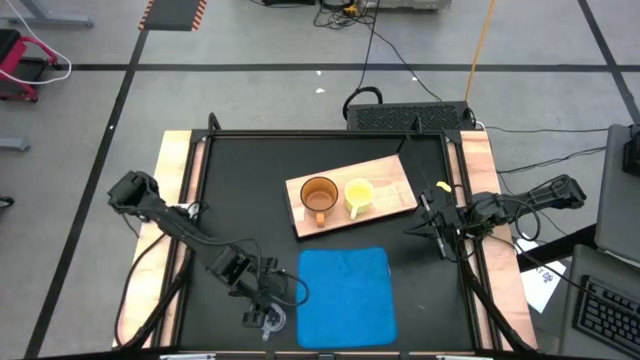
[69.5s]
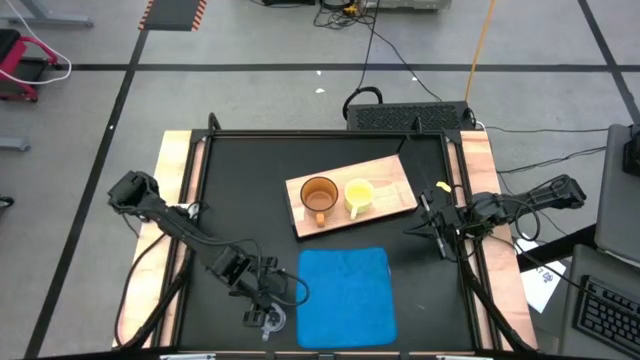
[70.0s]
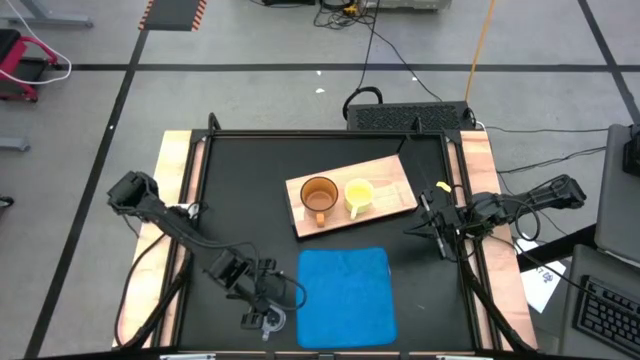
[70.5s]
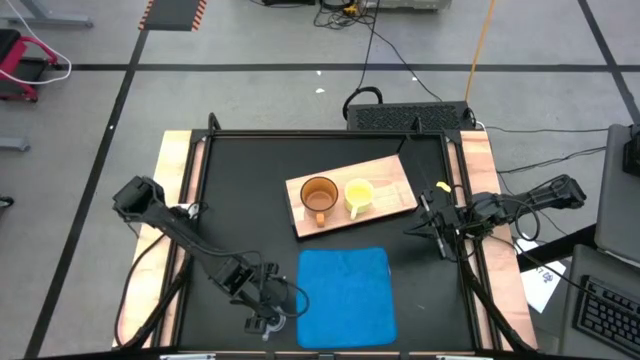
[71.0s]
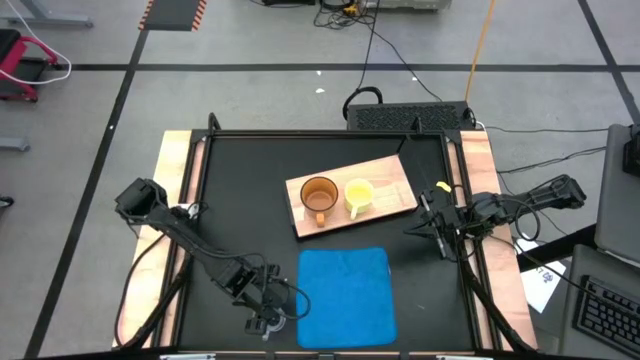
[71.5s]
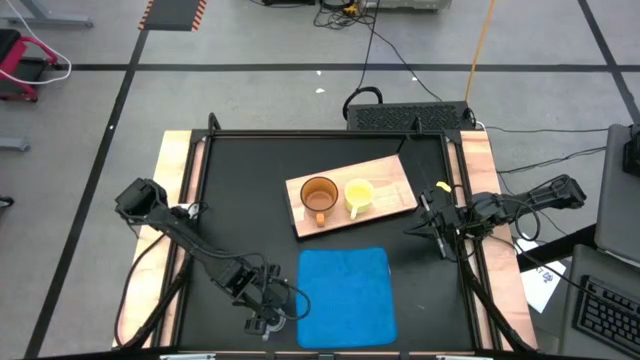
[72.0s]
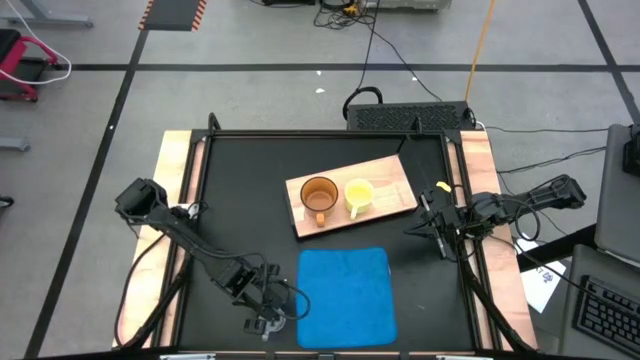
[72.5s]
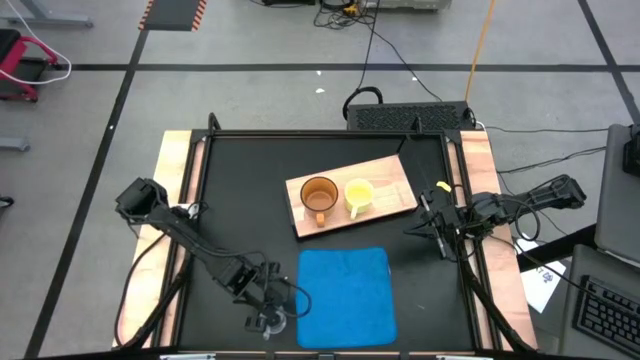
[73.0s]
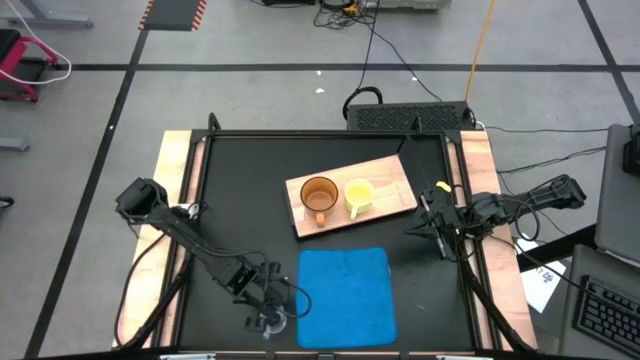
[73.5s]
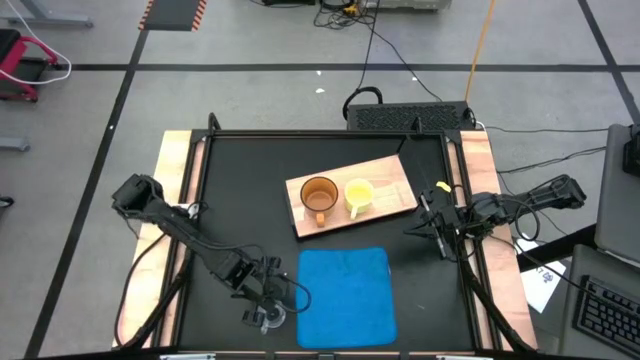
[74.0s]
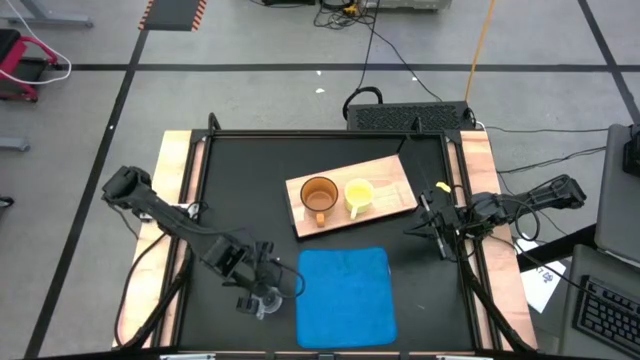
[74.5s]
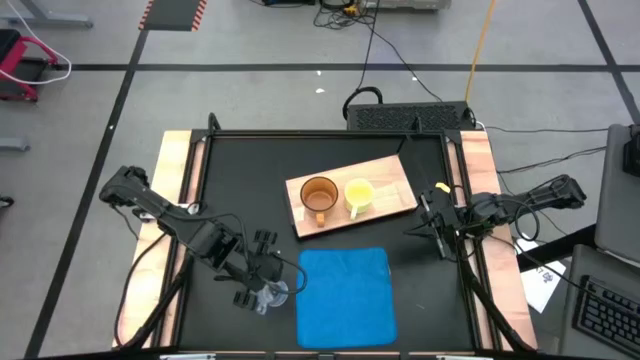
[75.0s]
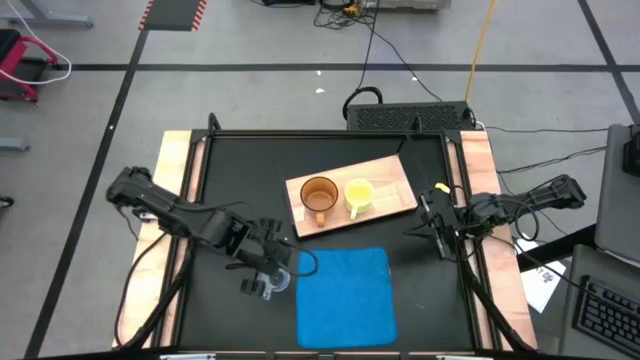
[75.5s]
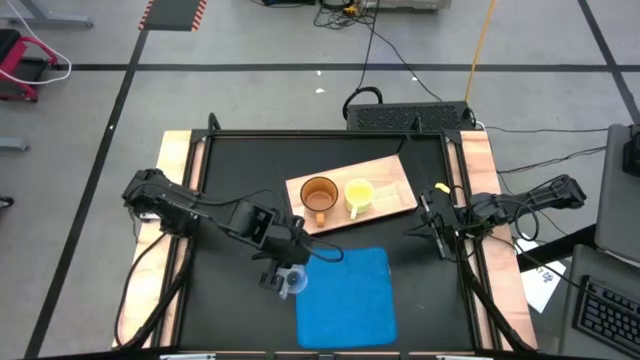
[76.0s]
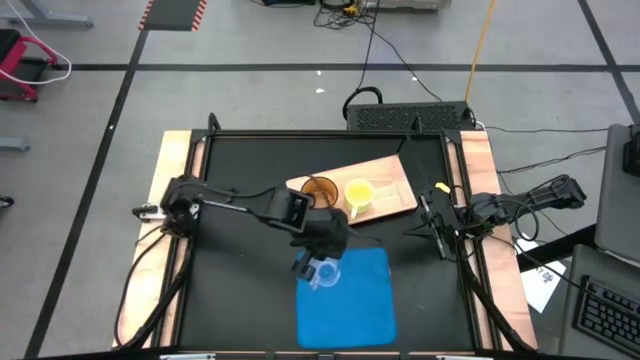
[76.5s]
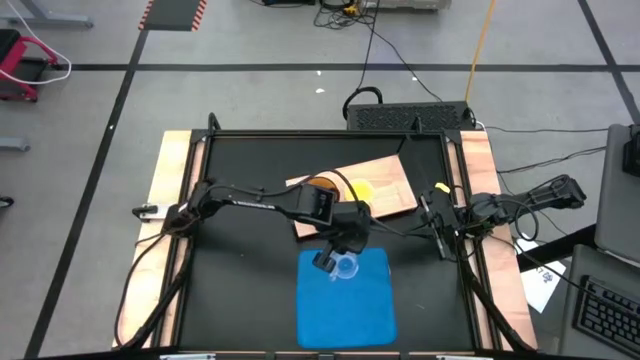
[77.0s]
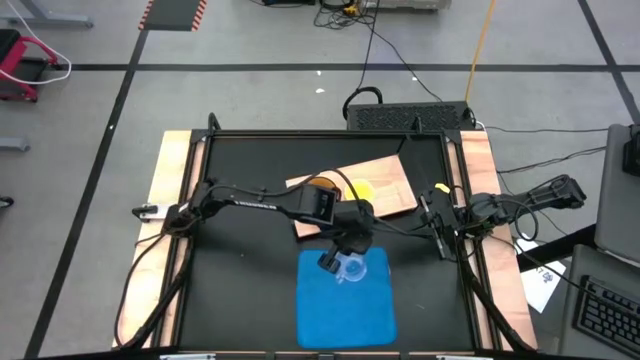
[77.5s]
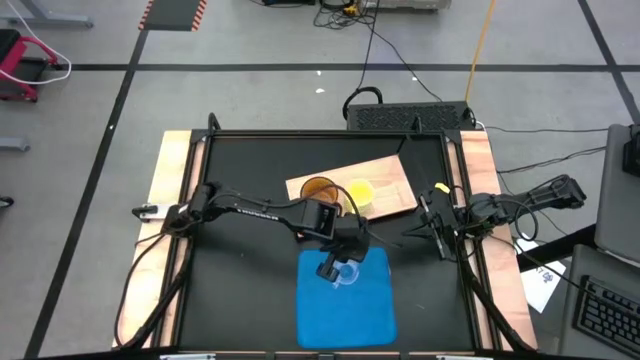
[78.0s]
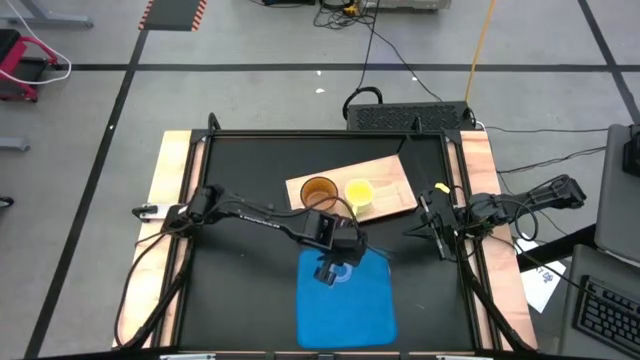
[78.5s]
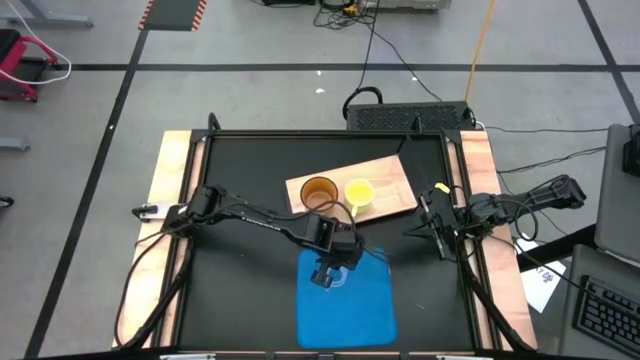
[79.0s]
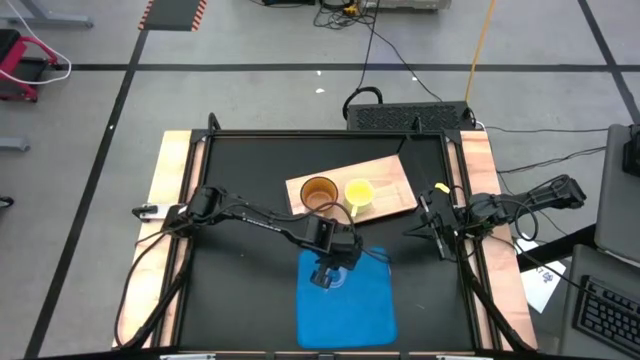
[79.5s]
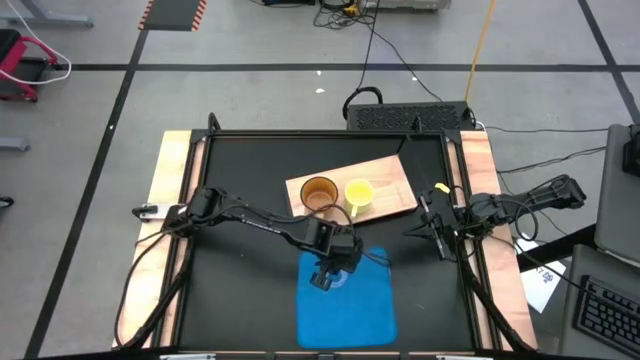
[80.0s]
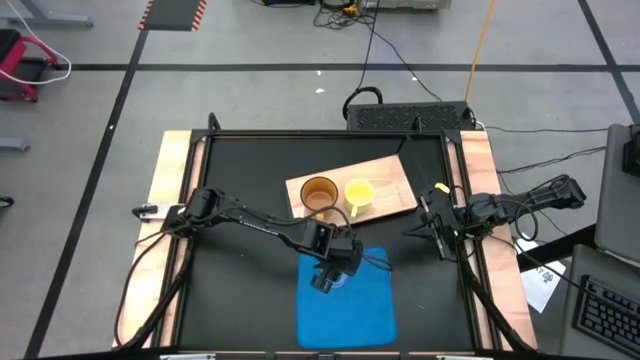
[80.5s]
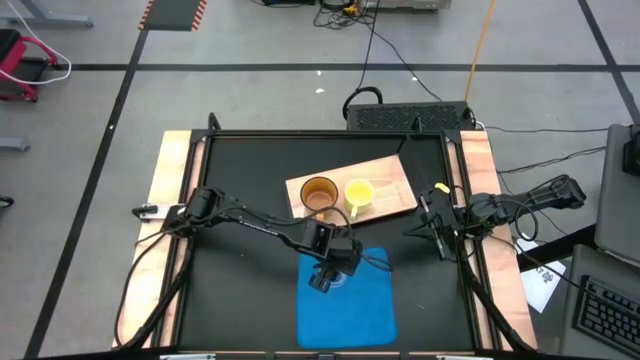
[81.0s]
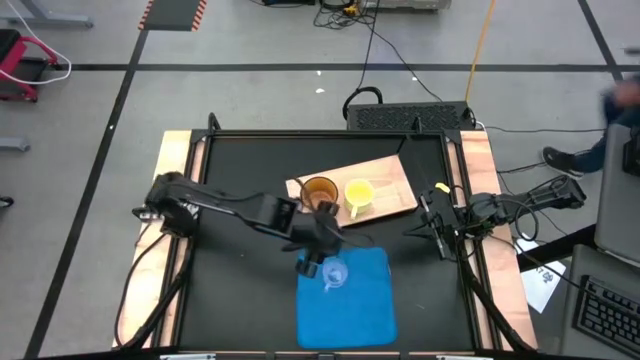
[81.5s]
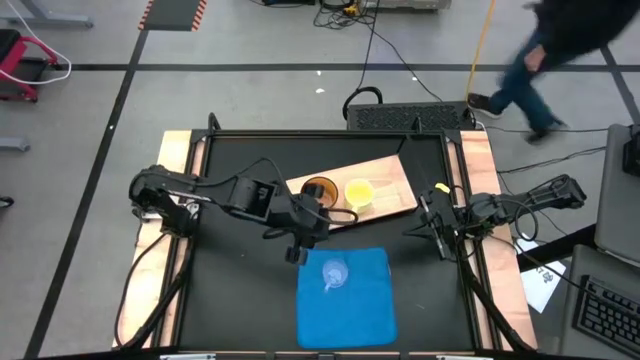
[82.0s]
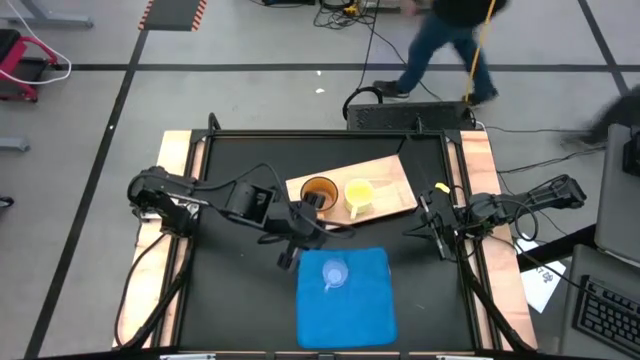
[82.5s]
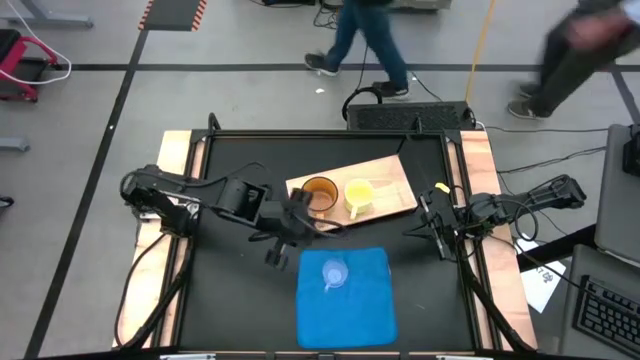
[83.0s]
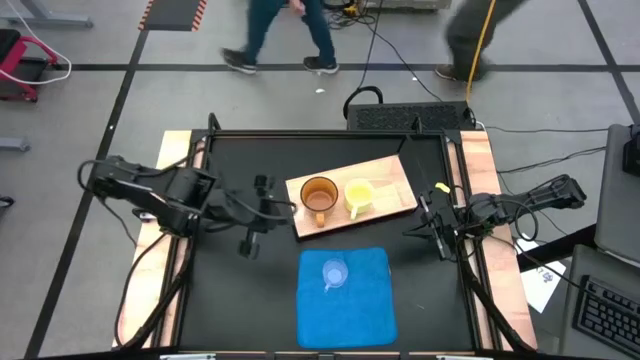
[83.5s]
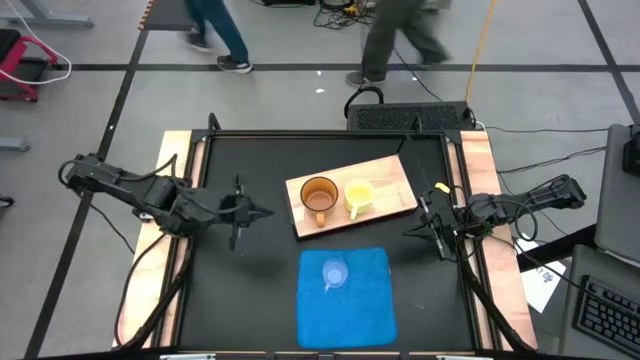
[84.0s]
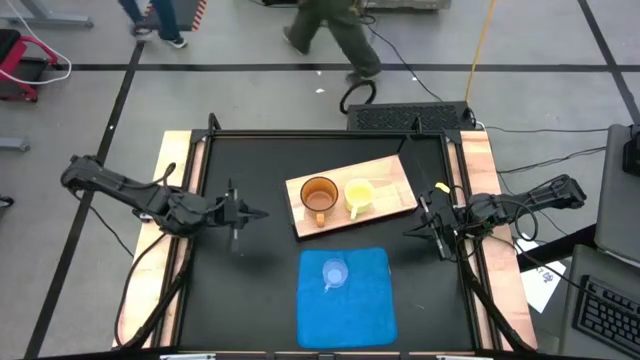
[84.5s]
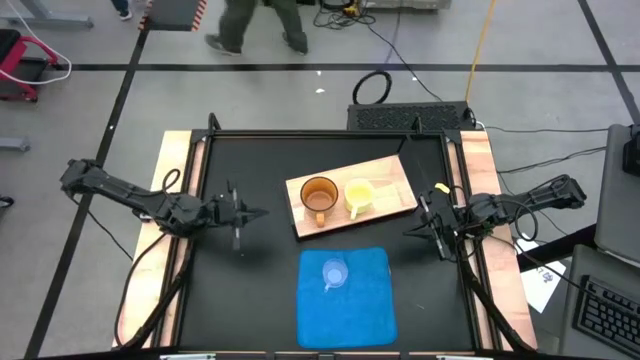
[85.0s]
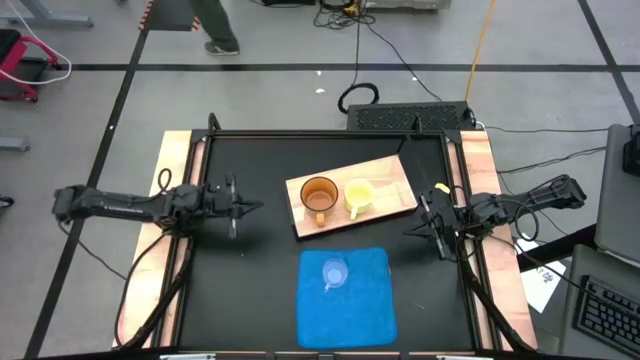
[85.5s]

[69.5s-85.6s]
Task: Stack small to large cups/mugs on shelf
Put the transparent mug on the shelf
